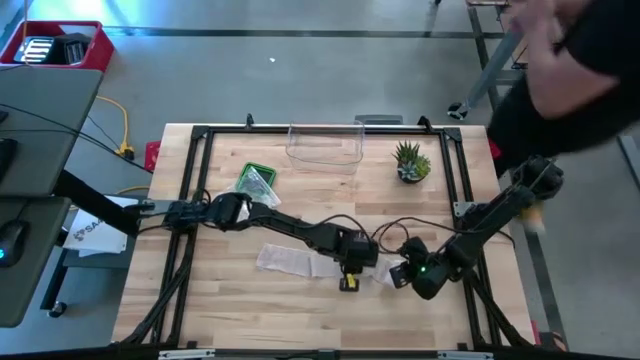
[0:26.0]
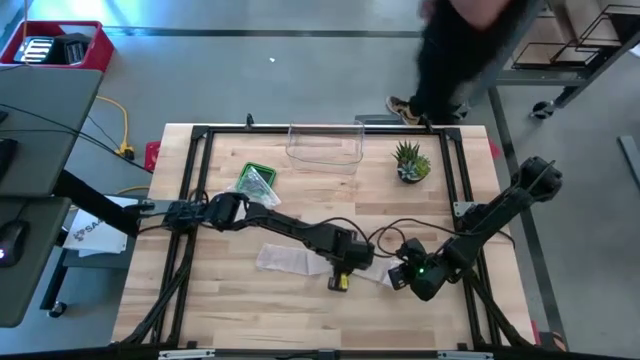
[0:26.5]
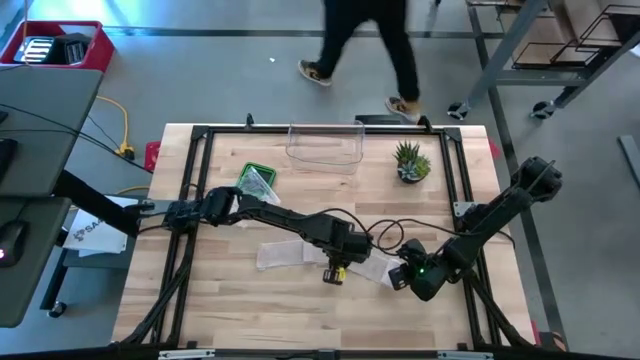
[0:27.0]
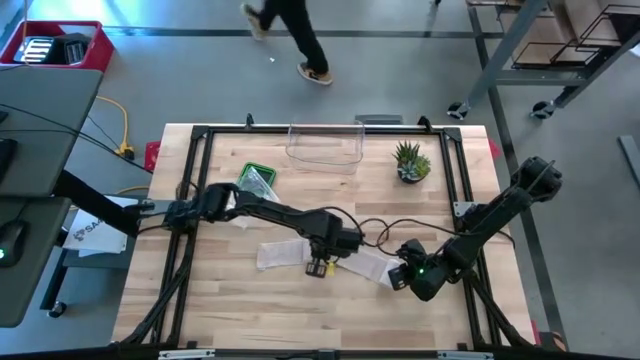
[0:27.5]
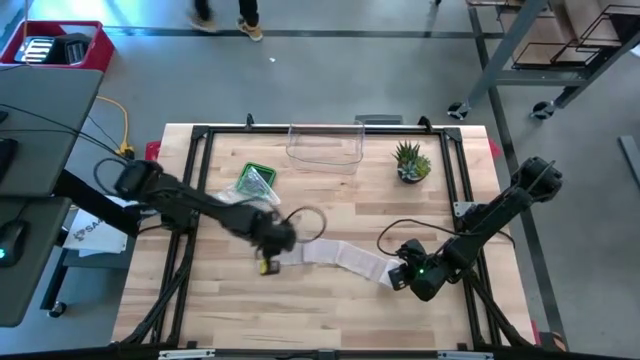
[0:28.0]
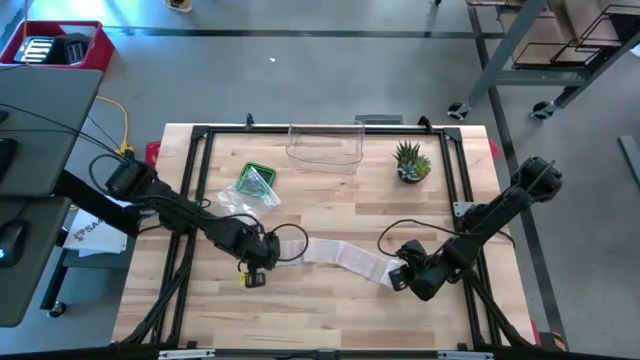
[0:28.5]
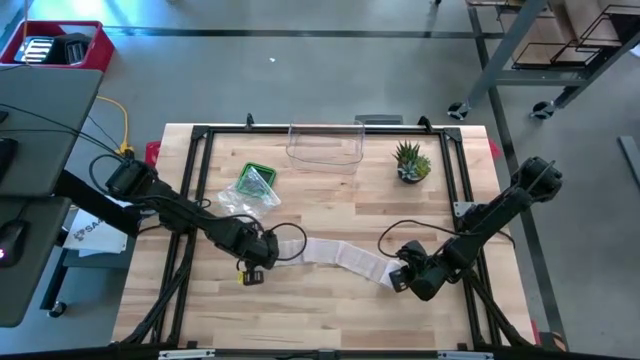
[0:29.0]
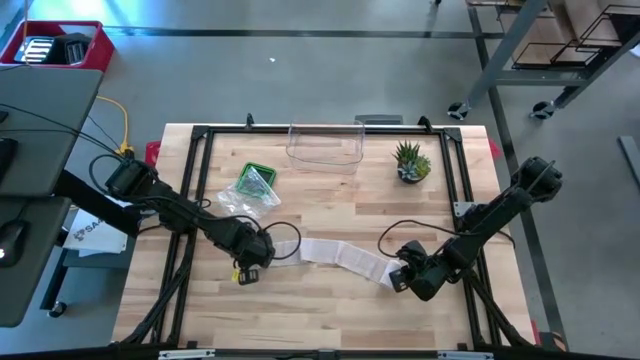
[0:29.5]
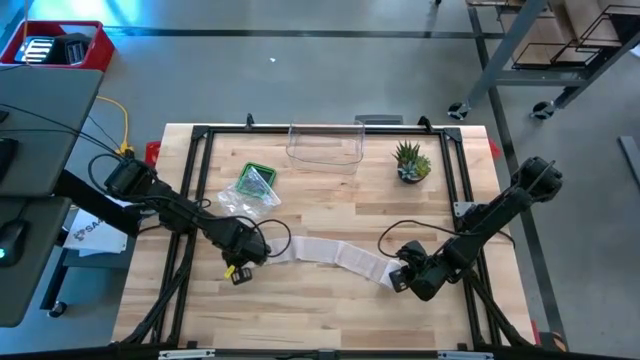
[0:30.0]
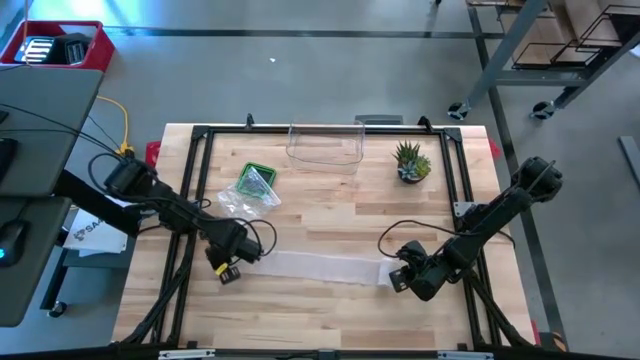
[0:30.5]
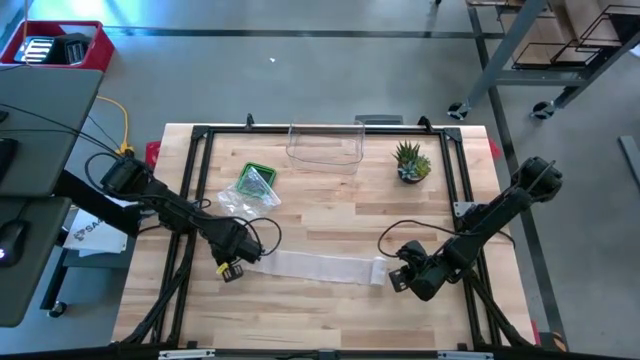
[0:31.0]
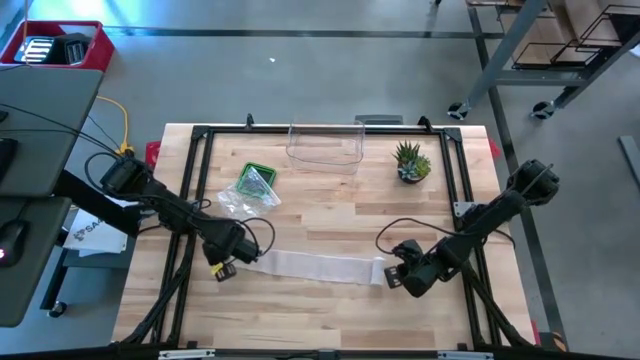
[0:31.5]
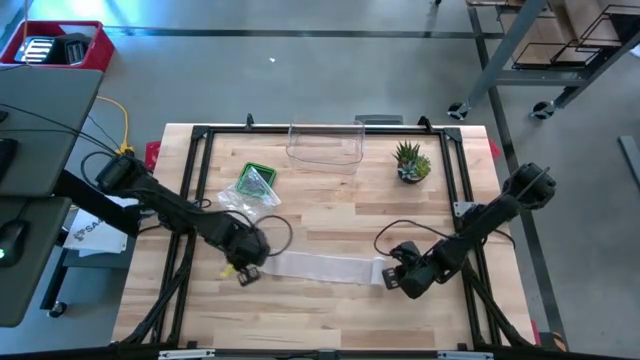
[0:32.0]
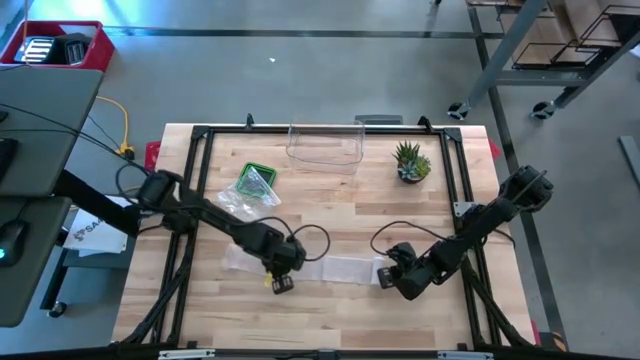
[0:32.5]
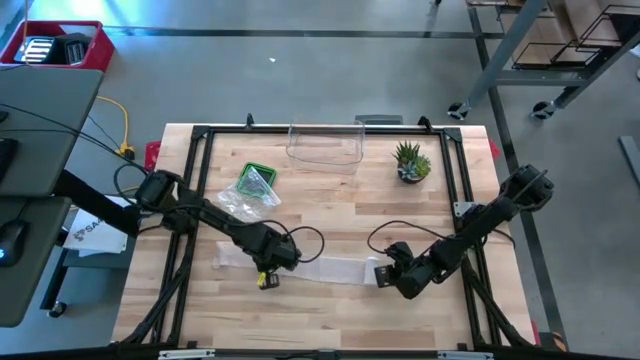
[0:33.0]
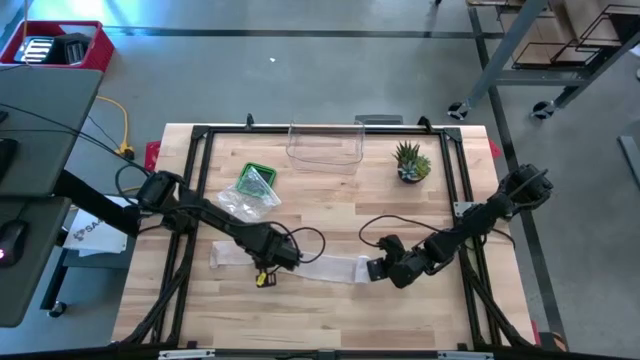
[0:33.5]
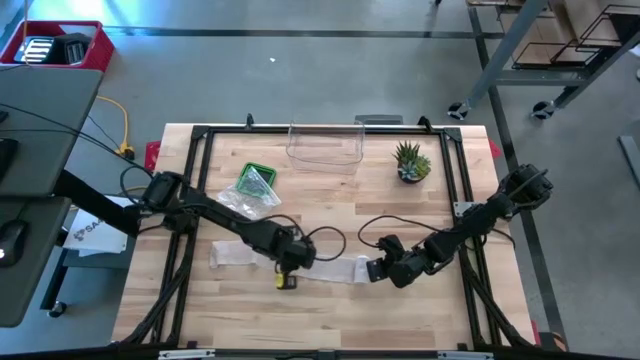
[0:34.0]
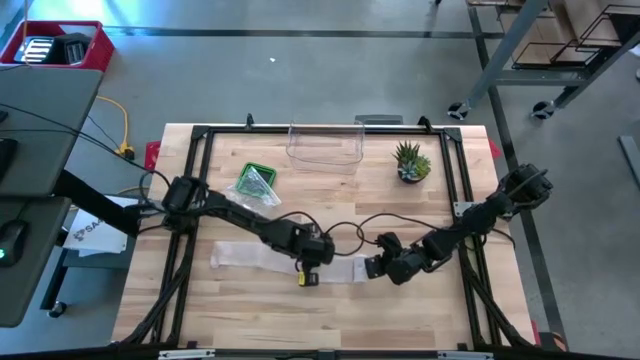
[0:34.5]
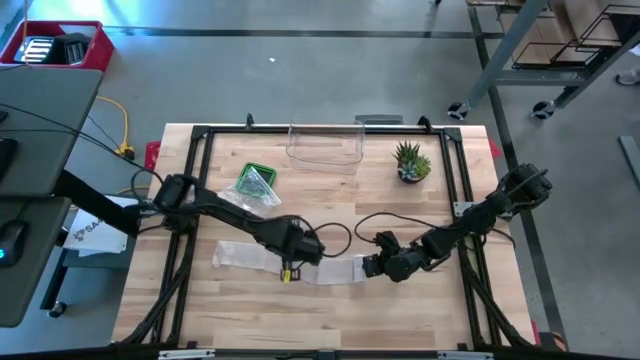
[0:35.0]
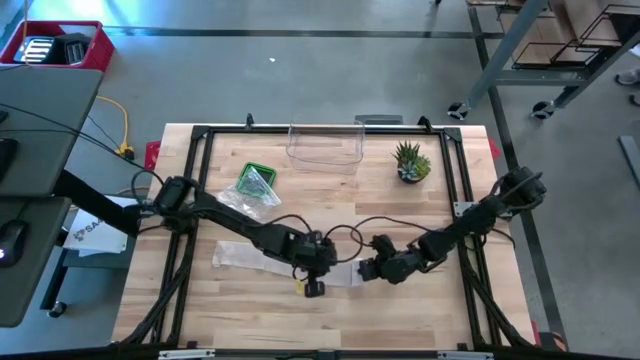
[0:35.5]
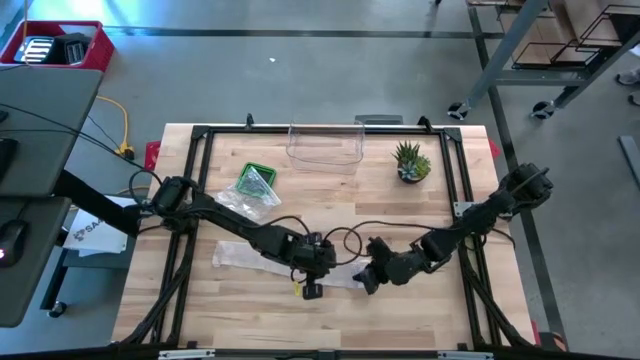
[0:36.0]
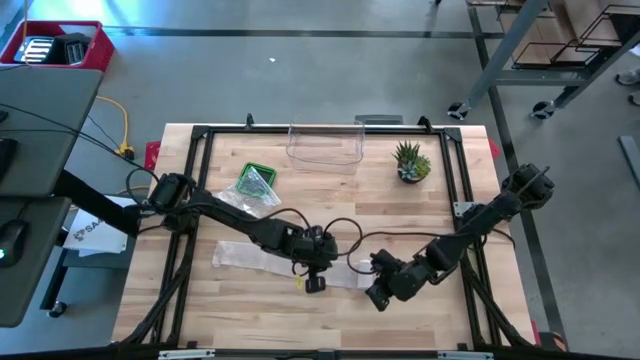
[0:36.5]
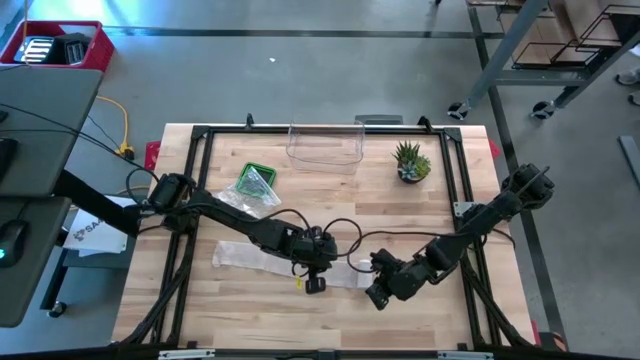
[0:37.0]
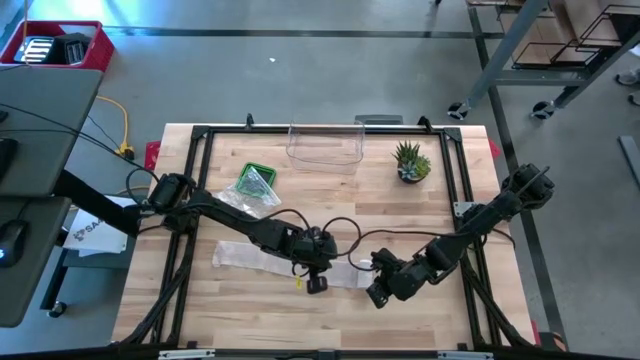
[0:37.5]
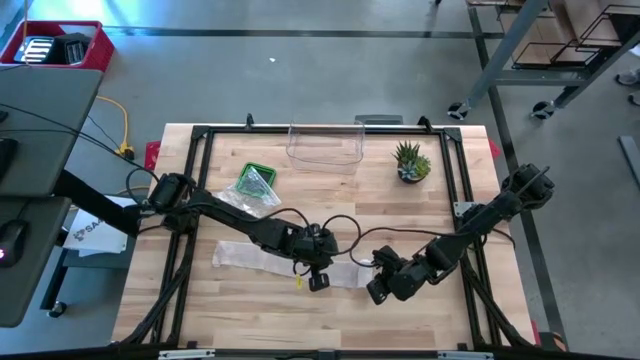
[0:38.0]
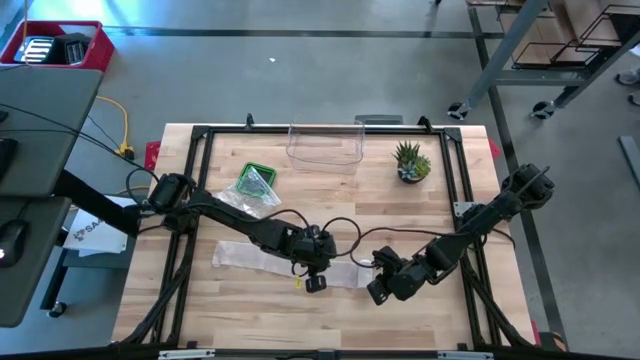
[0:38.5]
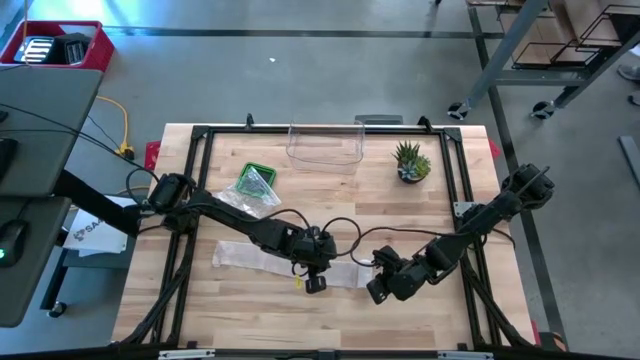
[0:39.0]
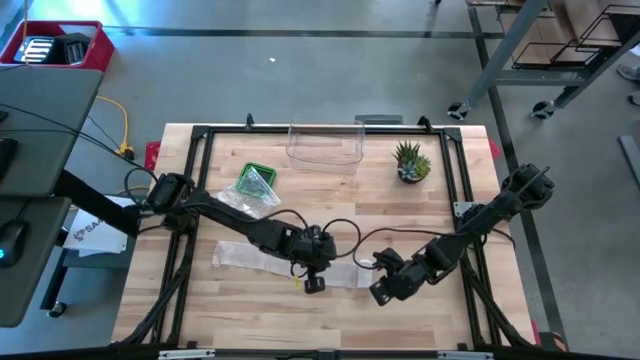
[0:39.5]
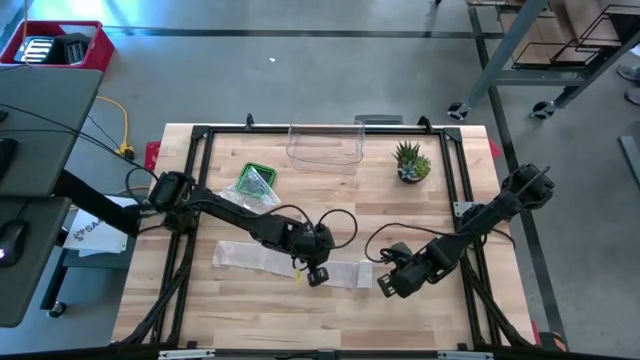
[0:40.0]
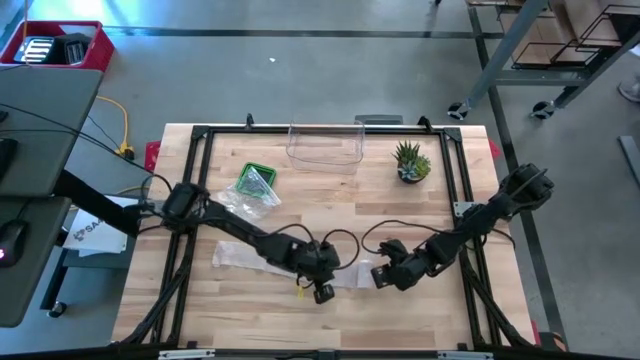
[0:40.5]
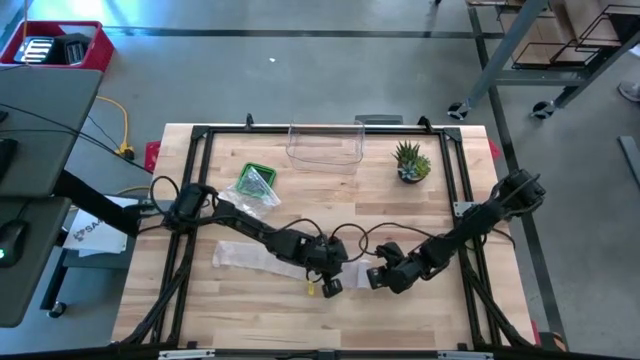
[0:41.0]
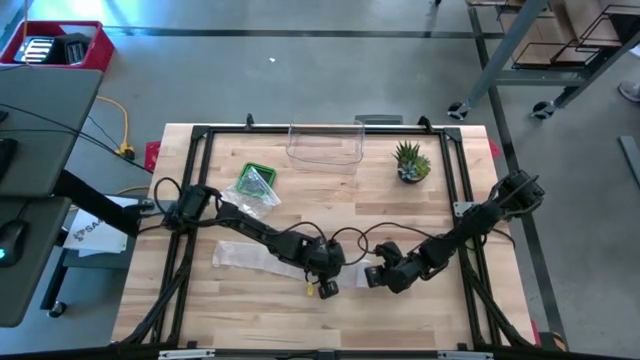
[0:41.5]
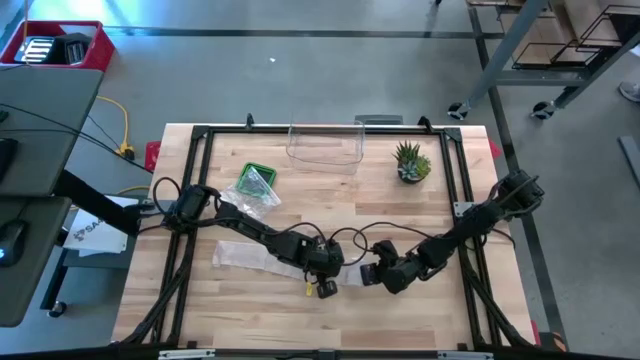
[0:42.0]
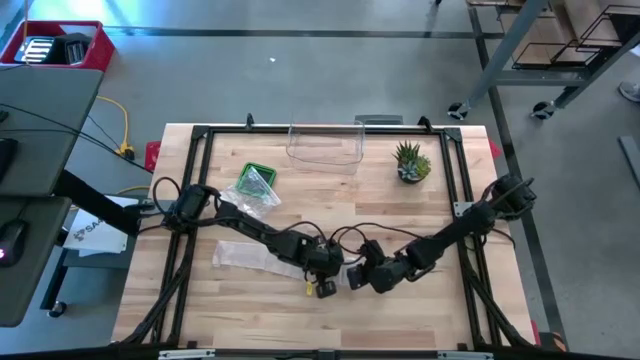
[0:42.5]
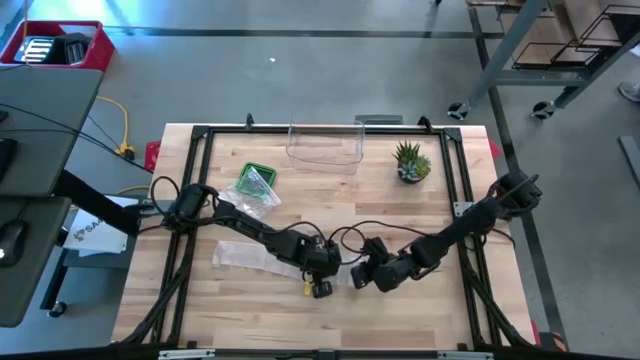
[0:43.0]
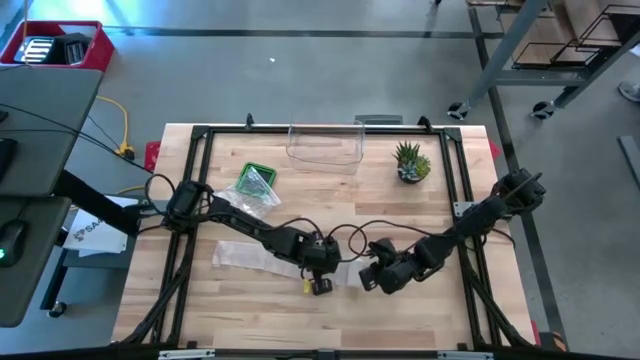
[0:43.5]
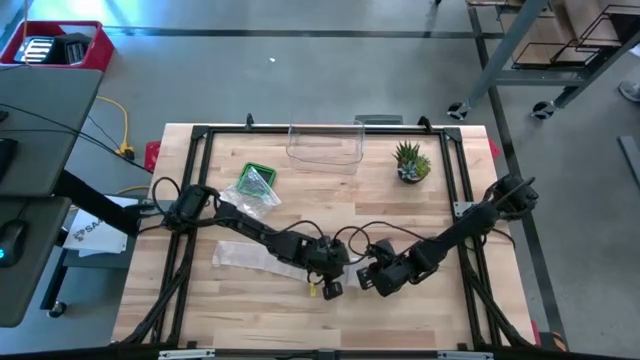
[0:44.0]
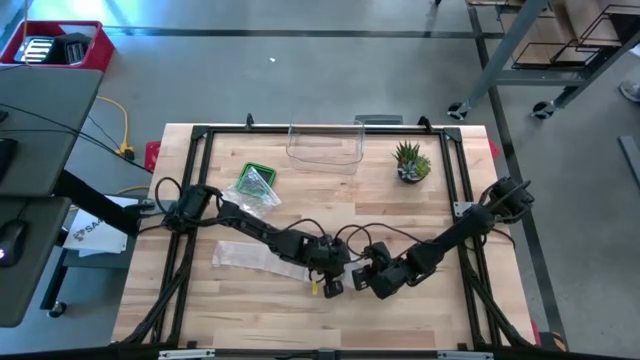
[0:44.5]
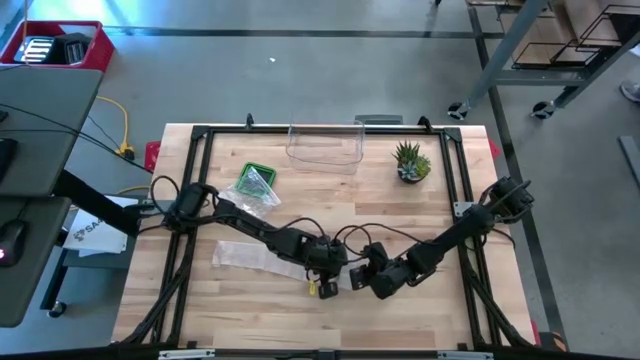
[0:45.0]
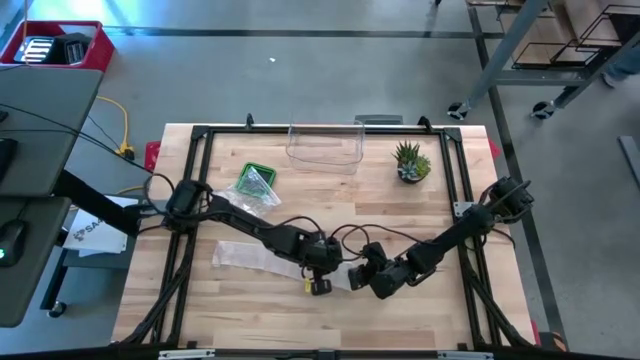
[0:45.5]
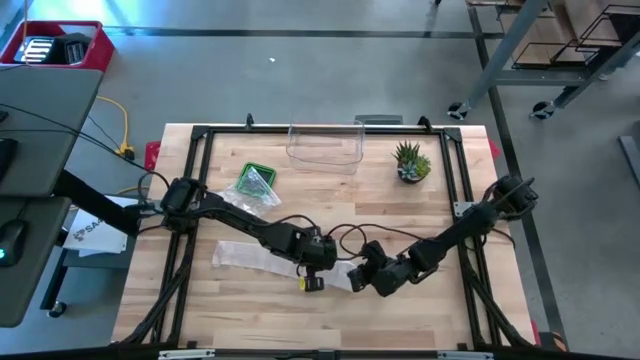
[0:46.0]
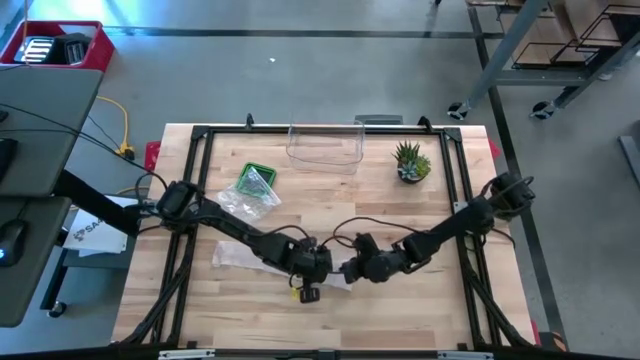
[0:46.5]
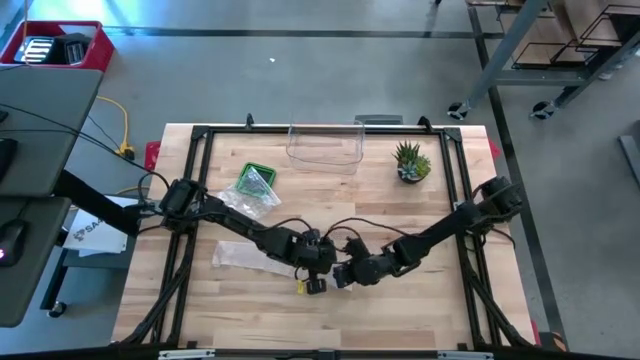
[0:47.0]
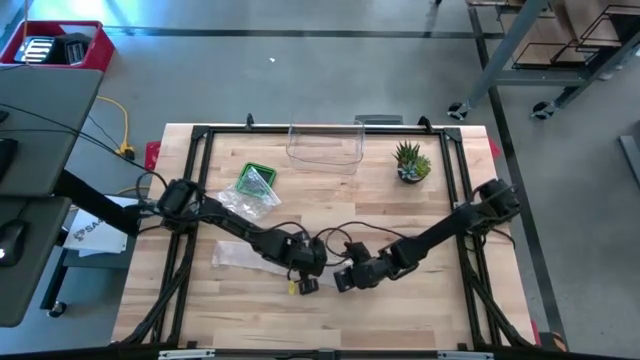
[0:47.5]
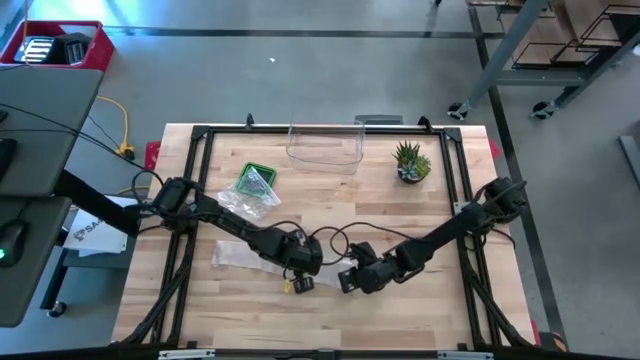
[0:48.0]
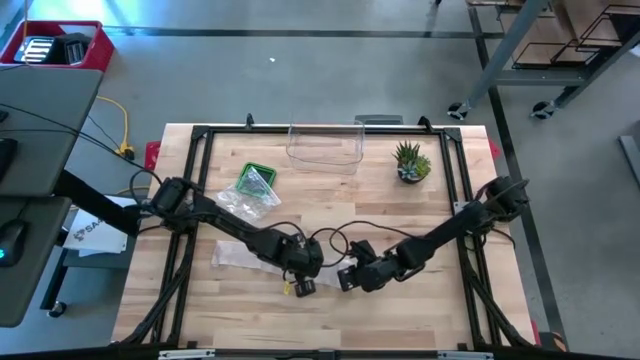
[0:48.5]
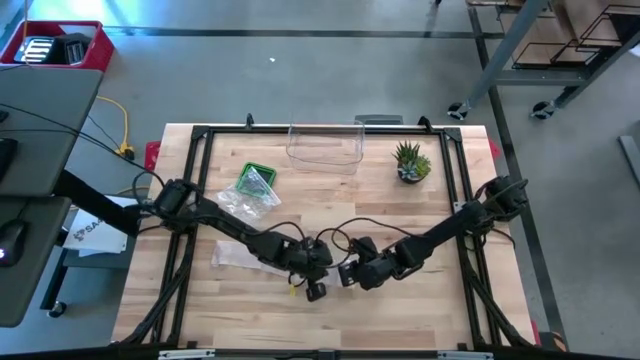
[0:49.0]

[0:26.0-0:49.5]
Task: Roll bandage
Roll the bandage
